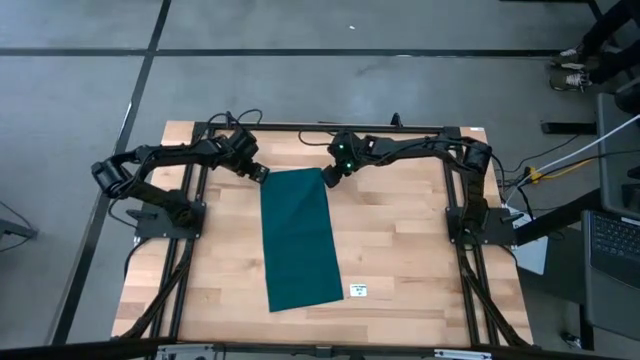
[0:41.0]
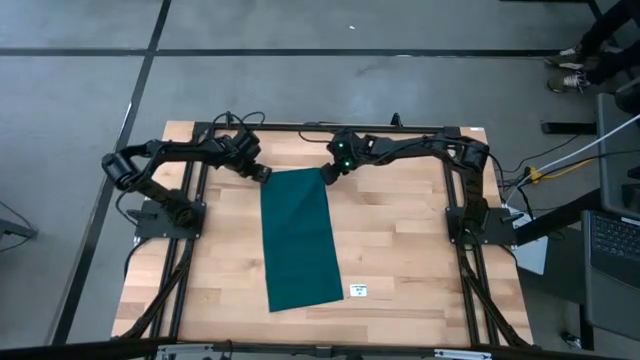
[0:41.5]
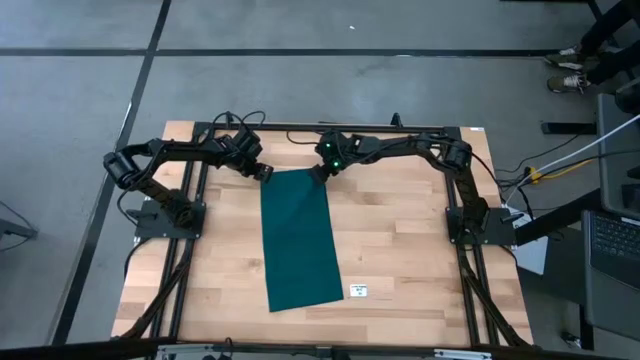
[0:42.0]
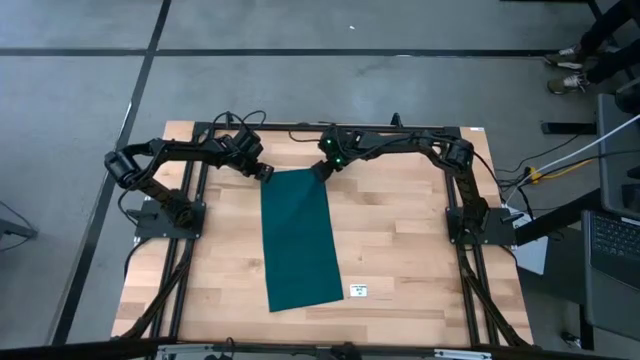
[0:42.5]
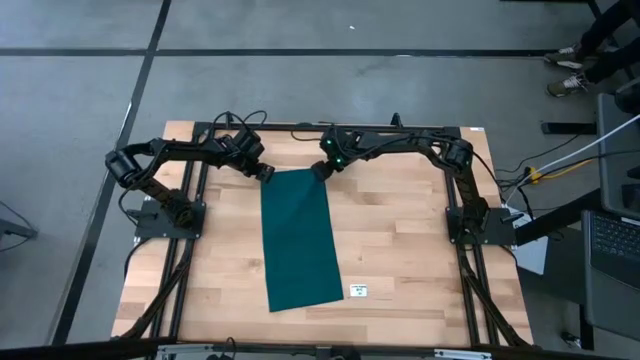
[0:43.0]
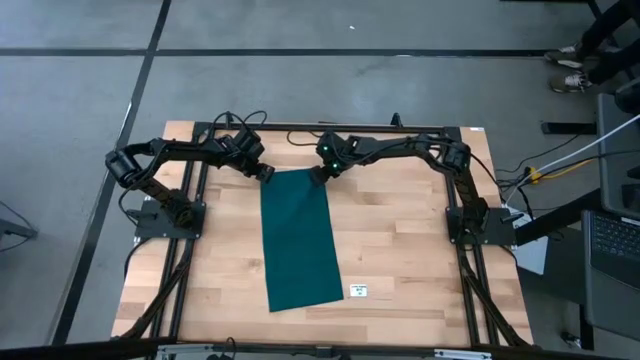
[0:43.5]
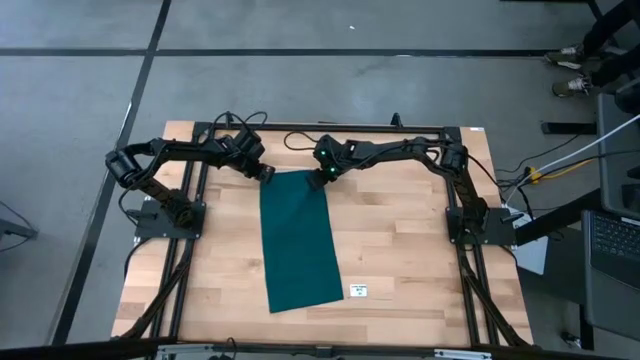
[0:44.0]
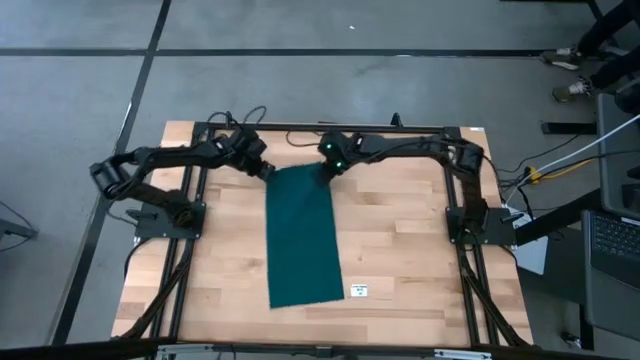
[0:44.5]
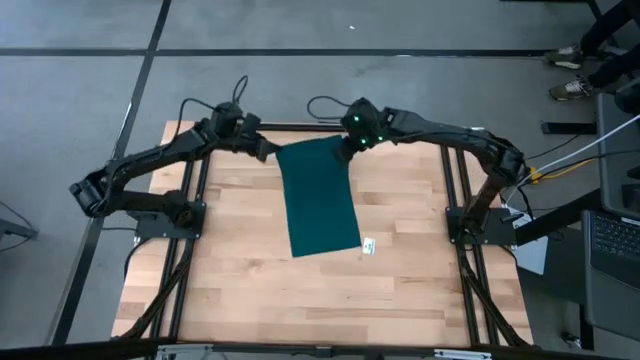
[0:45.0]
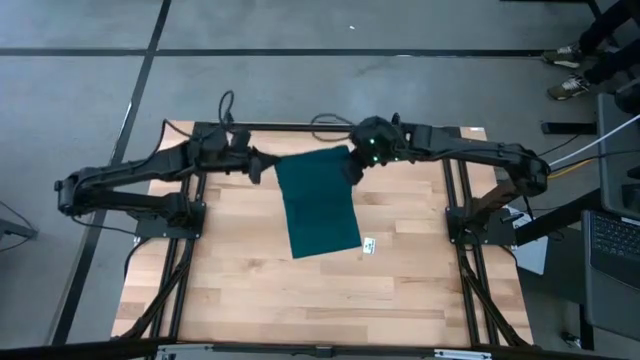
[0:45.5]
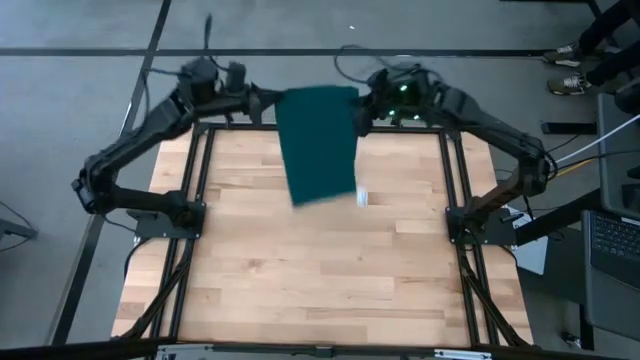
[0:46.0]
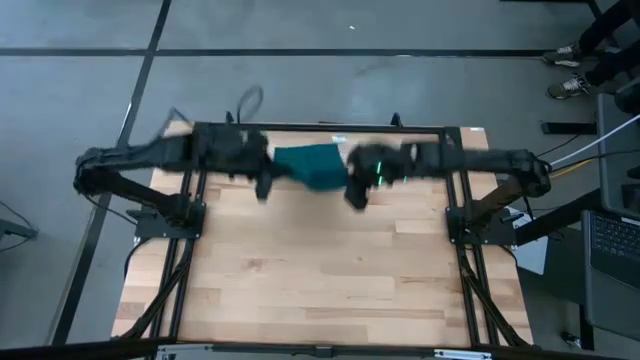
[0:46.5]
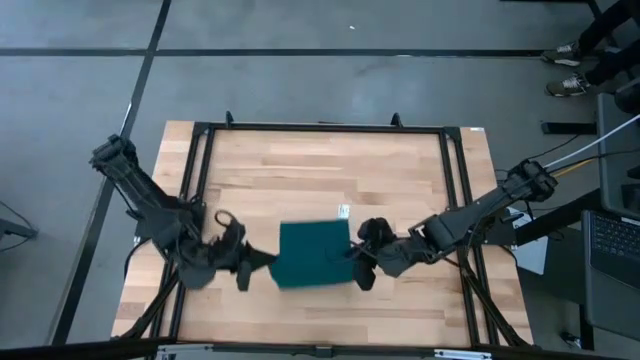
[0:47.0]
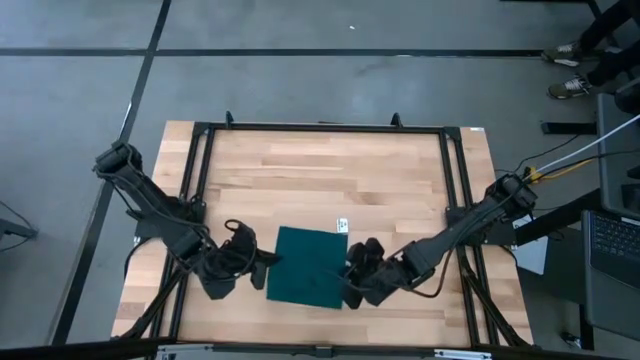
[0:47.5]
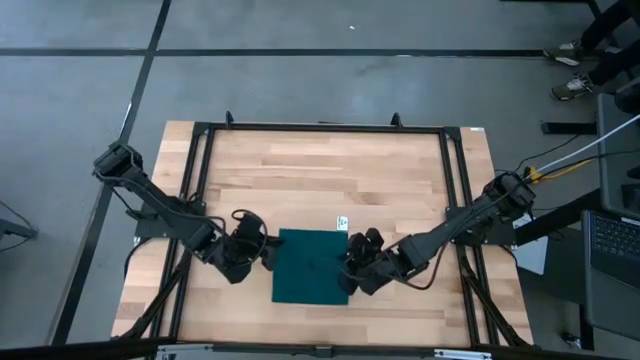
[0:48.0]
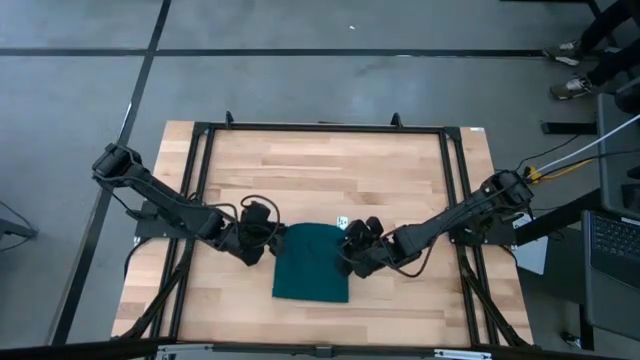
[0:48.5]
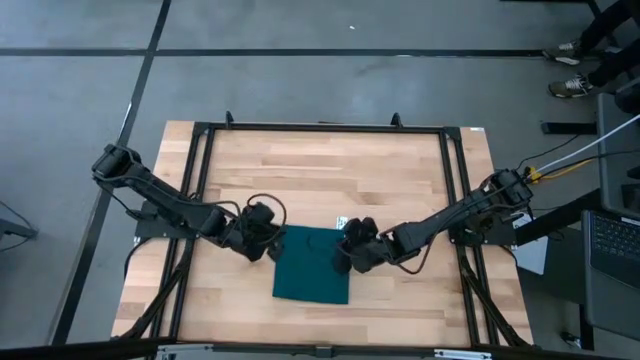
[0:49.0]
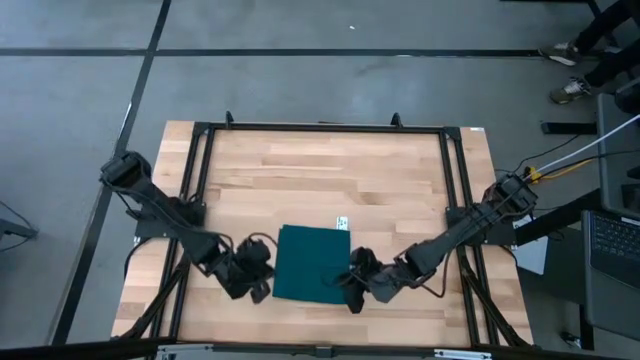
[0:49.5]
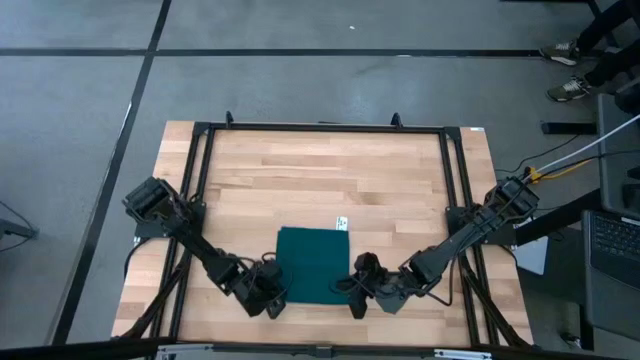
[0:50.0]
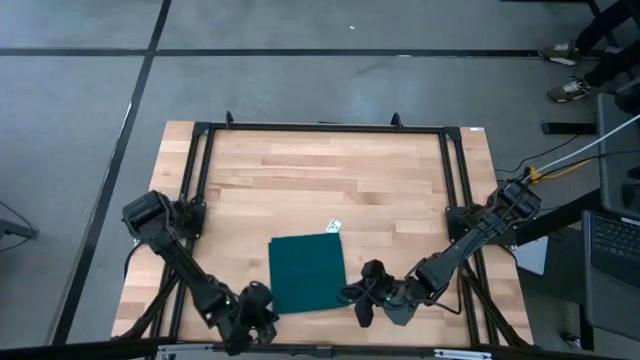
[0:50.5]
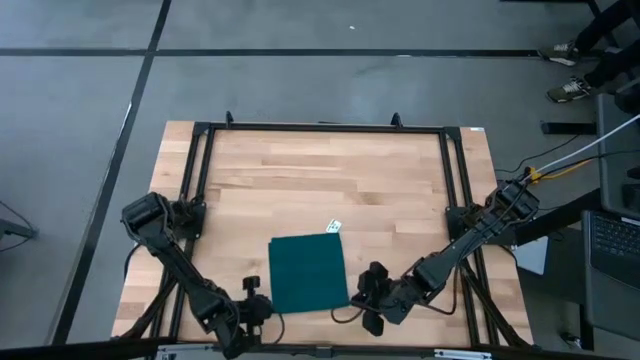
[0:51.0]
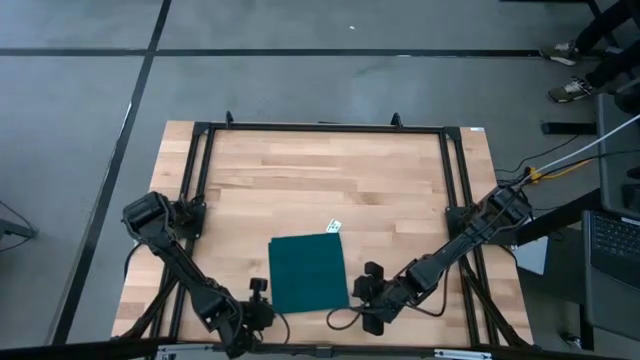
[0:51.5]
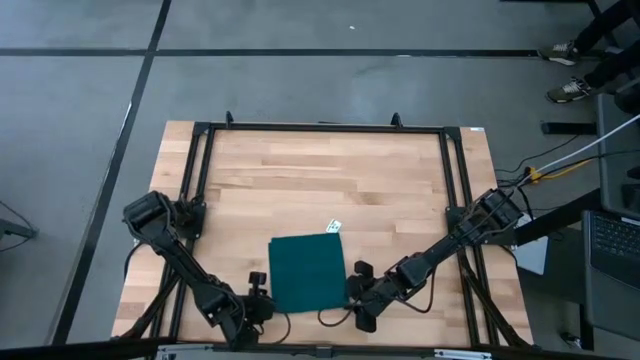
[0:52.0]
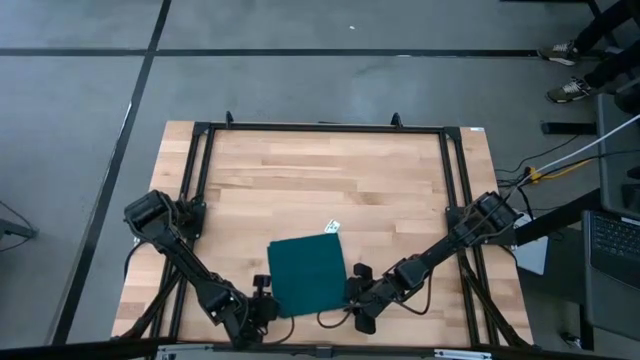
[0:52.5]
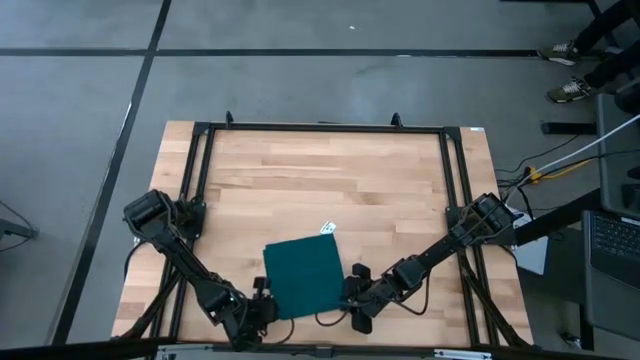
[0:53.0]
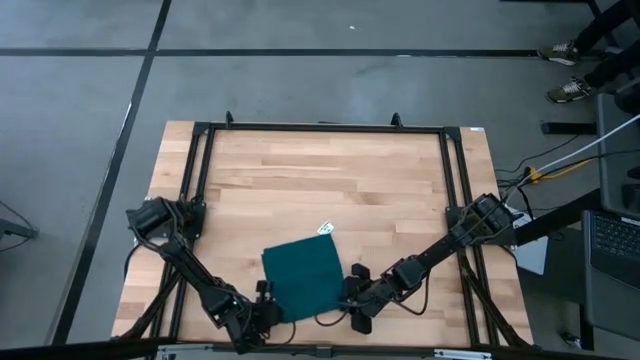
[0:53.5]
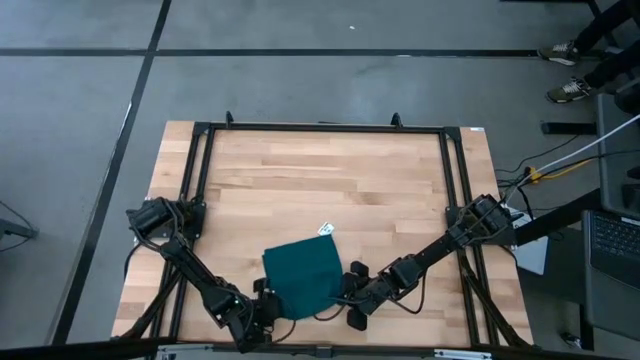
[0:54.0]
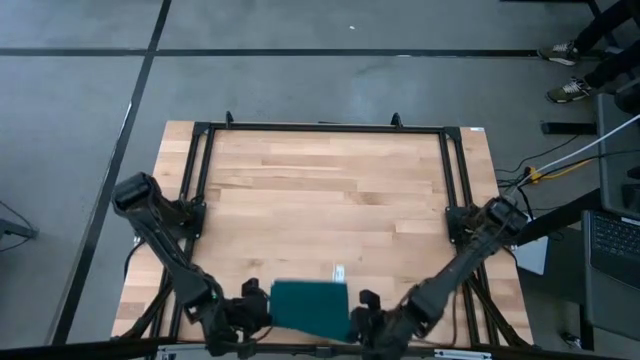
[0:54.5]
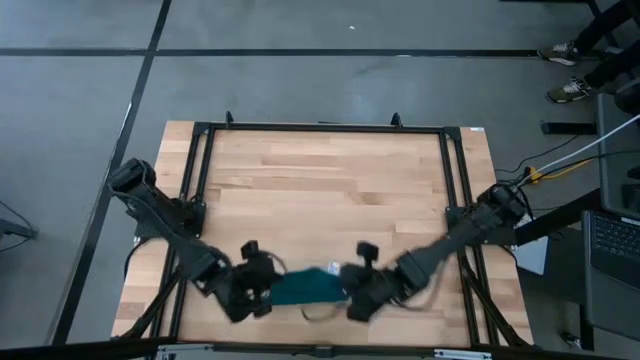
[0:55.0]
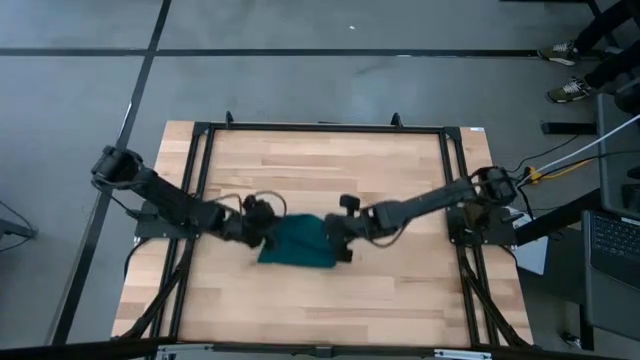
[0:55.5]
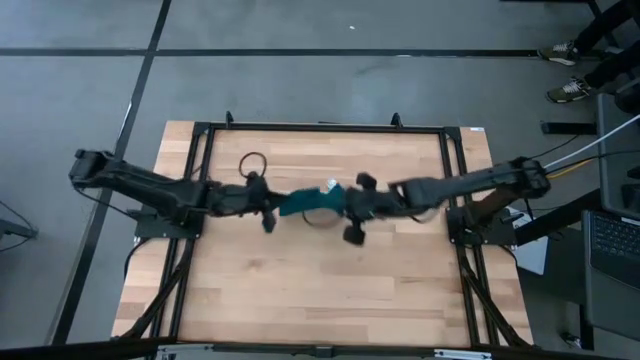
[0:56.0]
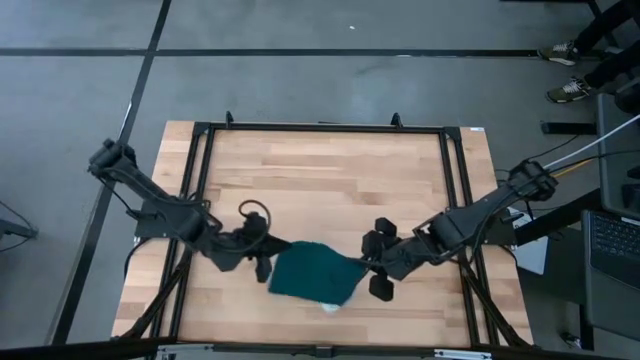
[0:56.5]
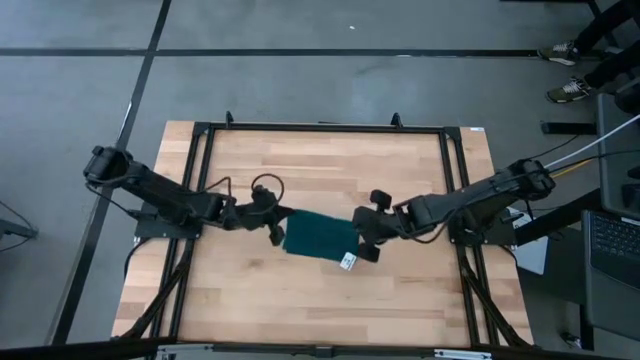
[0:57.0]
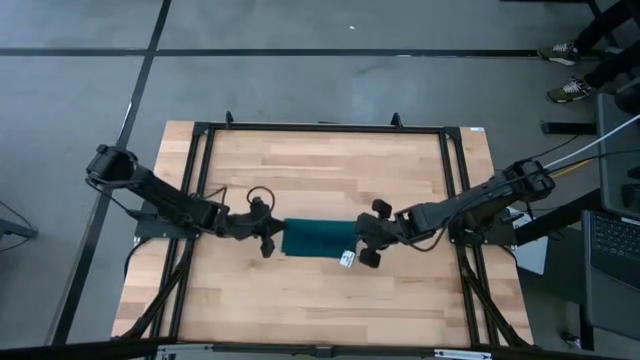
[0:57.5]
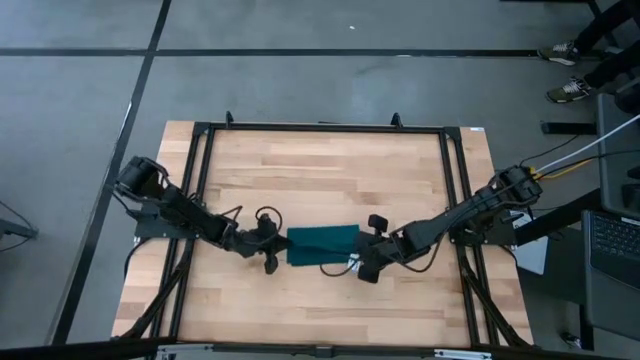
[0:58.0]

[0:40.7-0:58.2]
Task: Fold microfiber towels
Fold the blue napkin

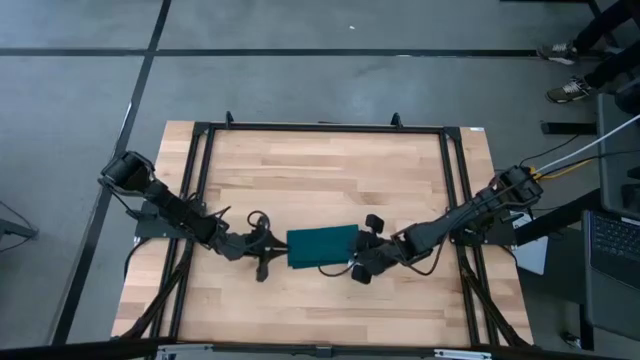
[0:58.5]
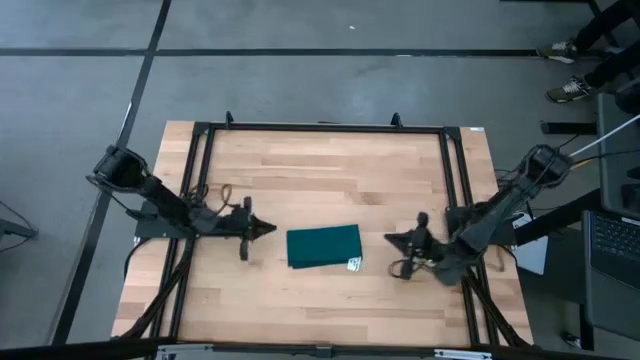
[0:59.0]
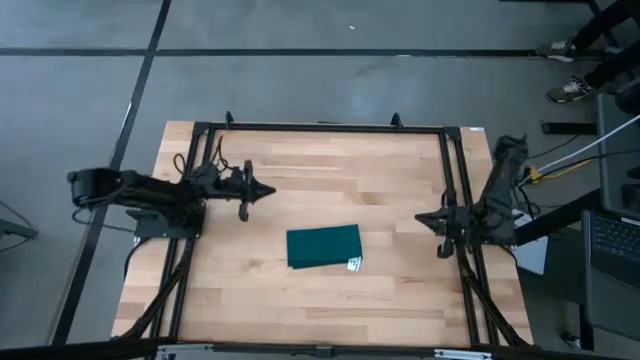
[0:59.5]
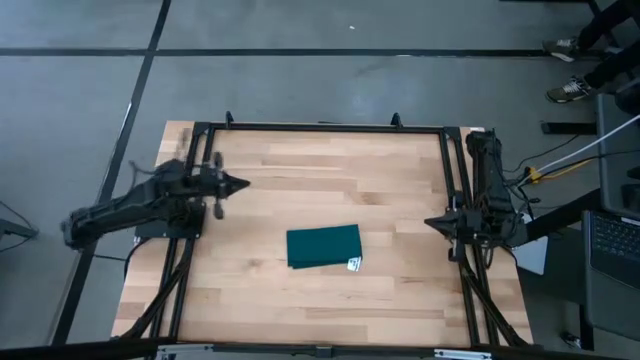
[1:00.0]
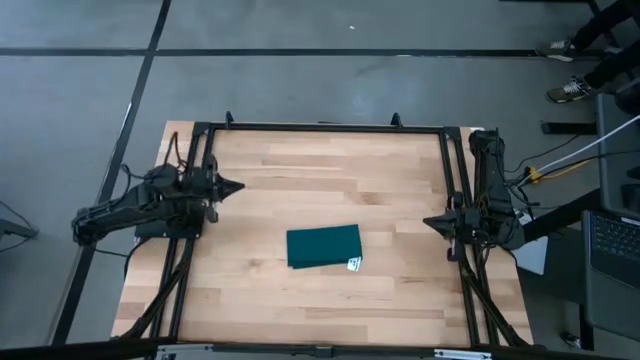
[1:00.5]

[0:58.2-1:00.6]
Return to Home Position
